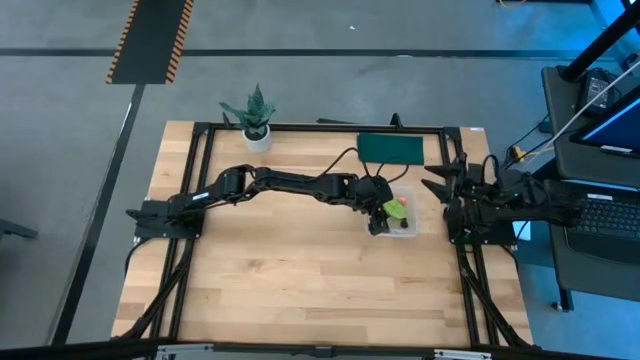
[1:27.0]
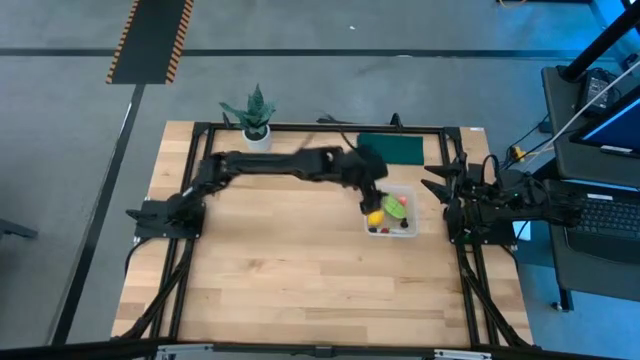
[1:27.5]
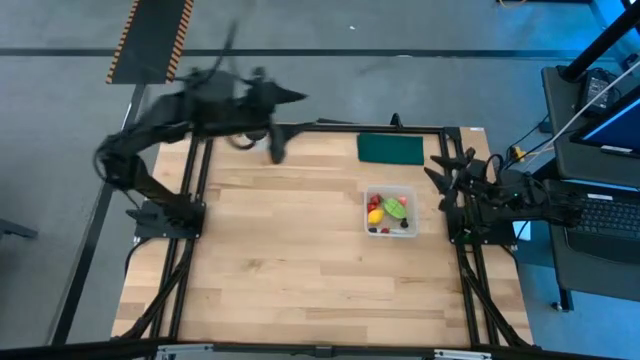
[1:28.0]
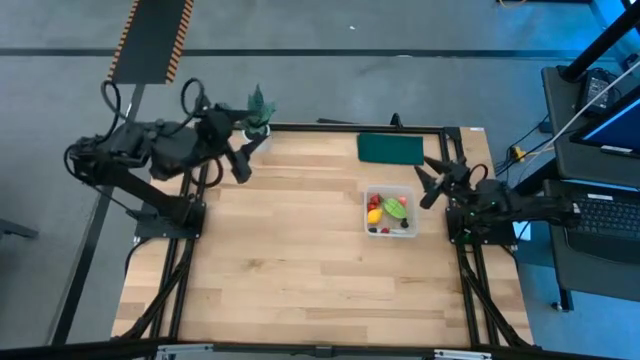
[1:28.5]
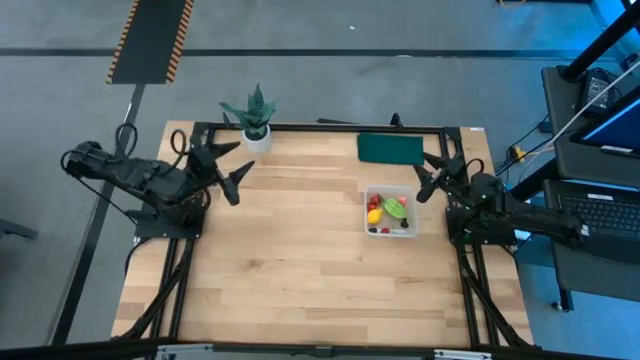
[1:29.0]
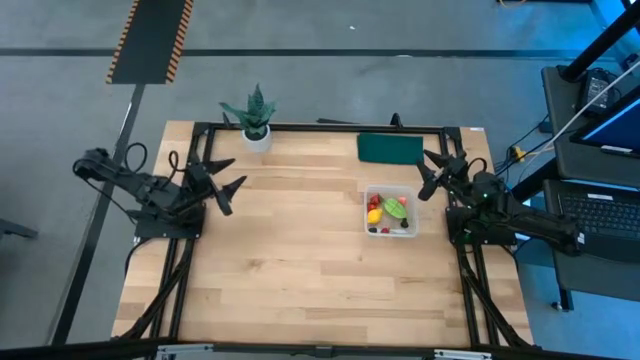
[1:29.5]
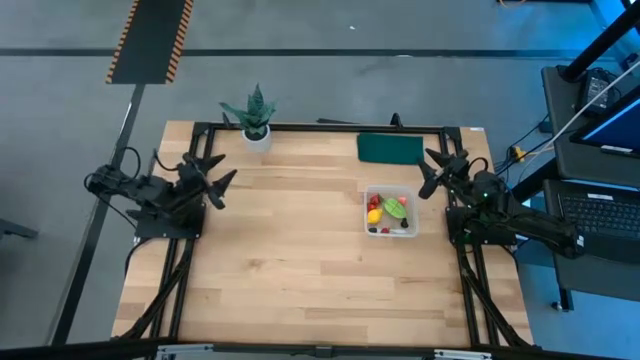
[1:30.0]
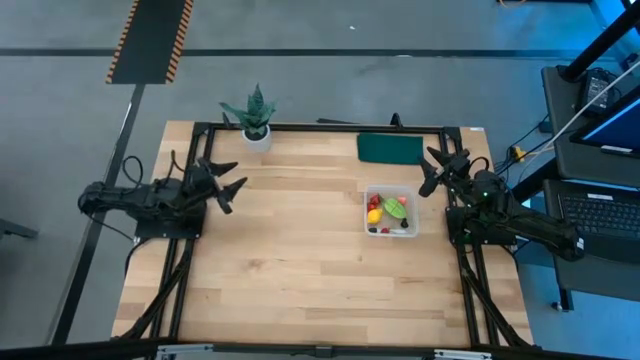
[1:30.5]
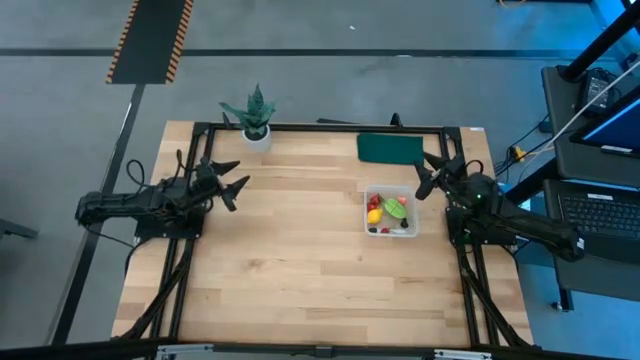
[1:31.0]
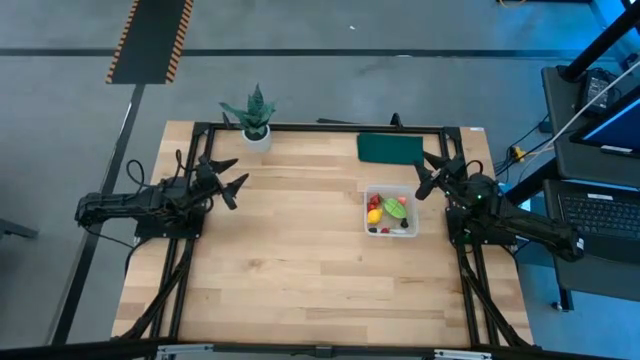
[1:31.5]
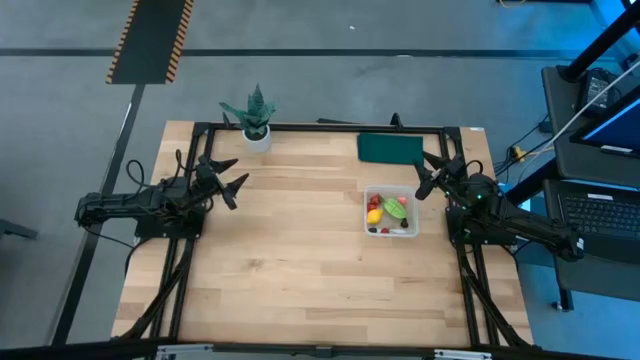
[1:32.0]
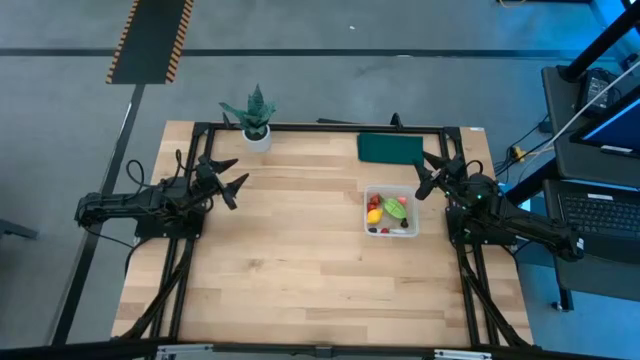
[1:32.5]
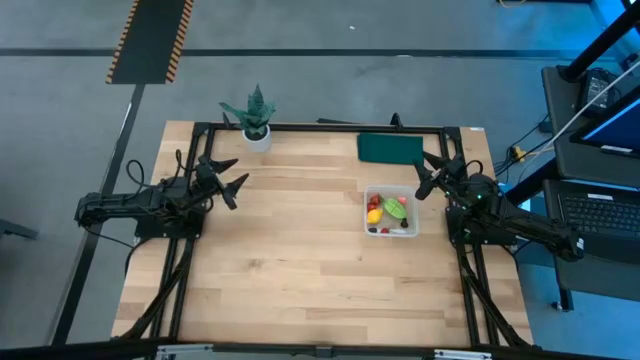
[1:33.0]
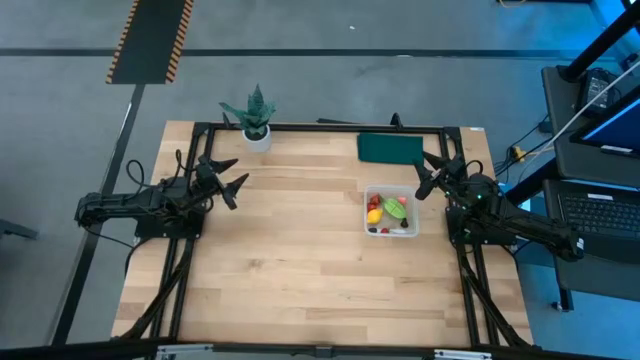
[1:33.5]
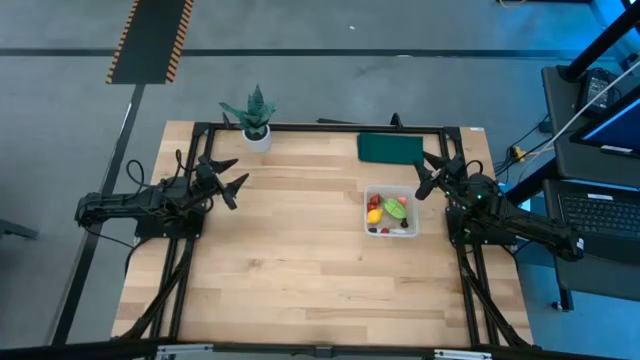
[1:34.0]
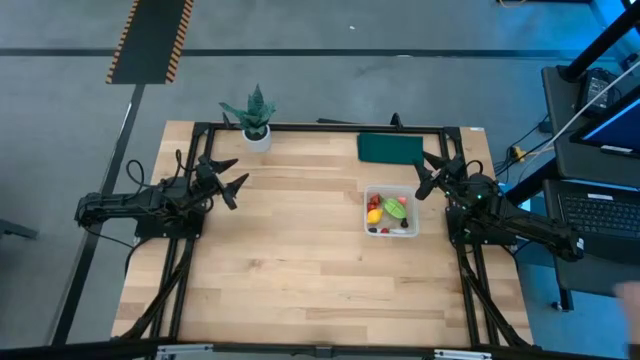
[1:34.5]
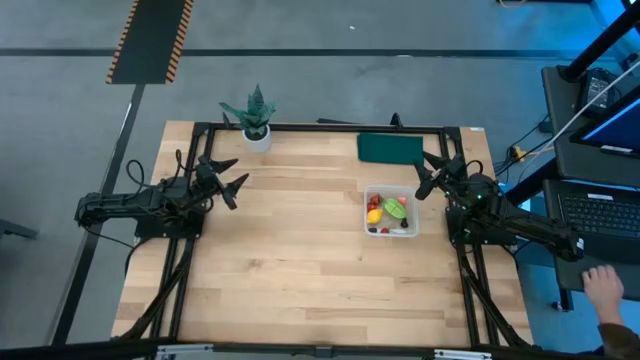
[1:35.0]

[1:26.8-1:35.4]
Task: Pick and placing Produce into tupperware
Return to Home Position

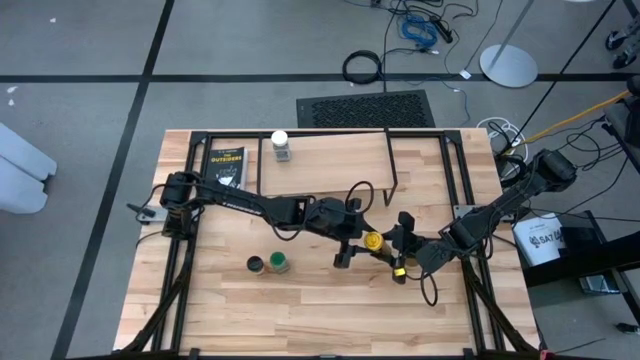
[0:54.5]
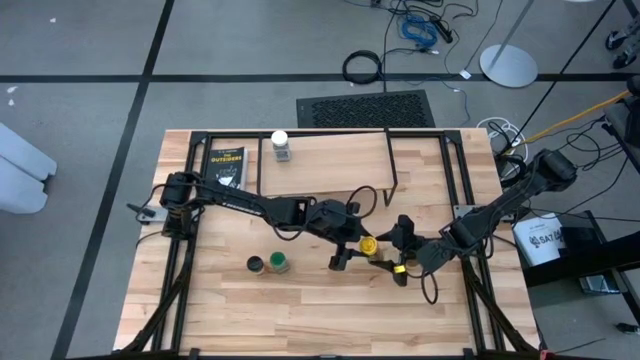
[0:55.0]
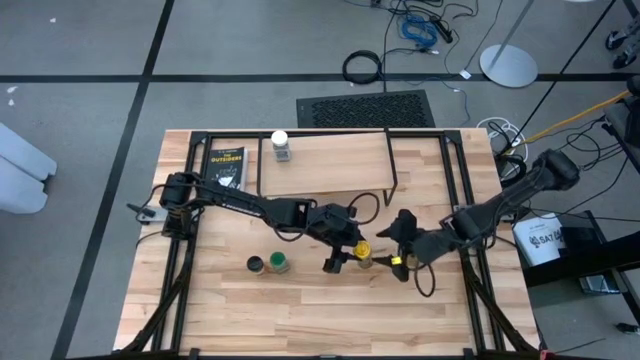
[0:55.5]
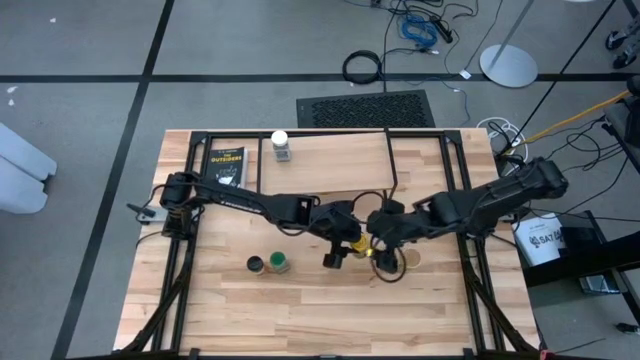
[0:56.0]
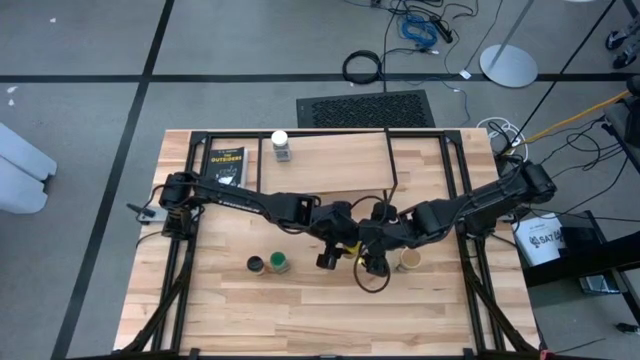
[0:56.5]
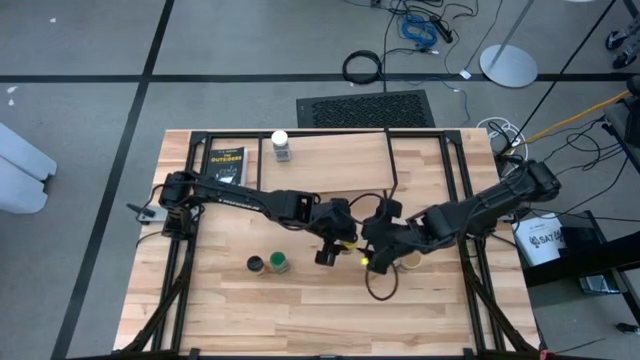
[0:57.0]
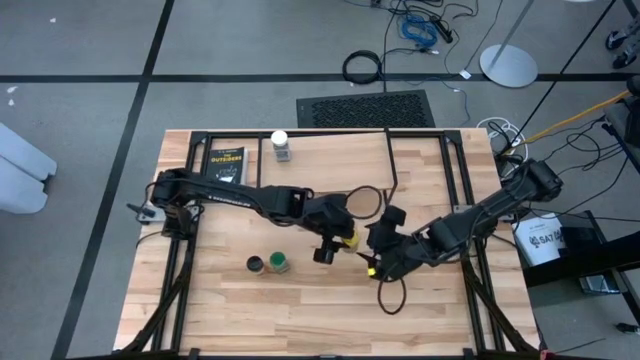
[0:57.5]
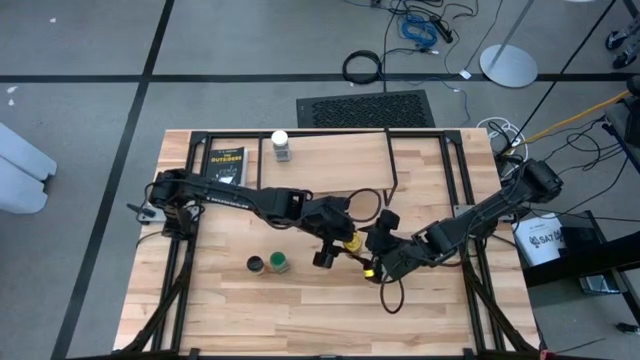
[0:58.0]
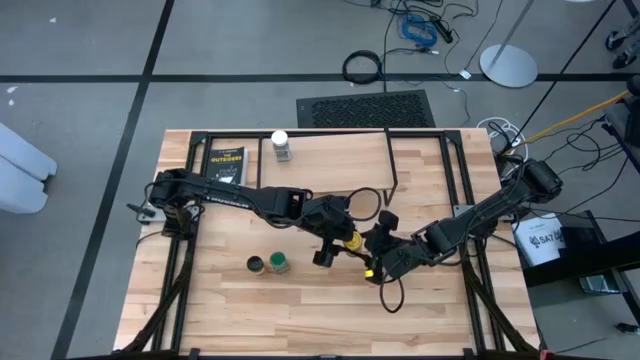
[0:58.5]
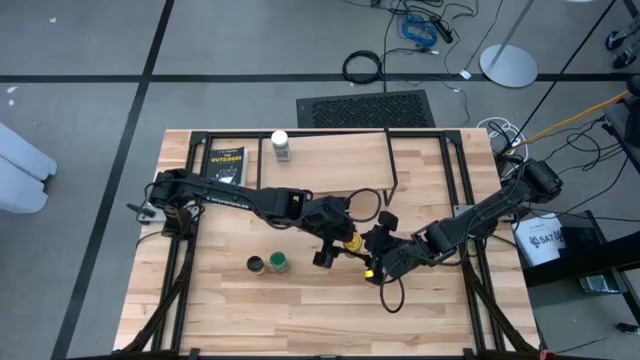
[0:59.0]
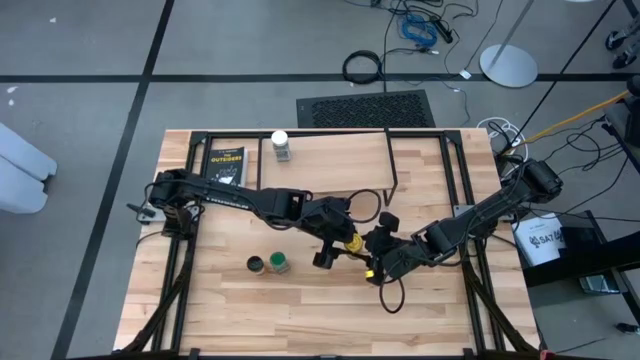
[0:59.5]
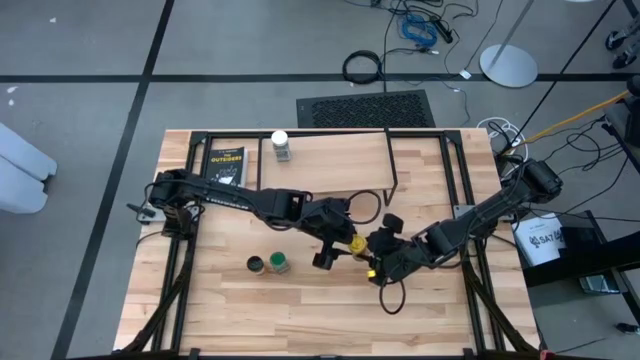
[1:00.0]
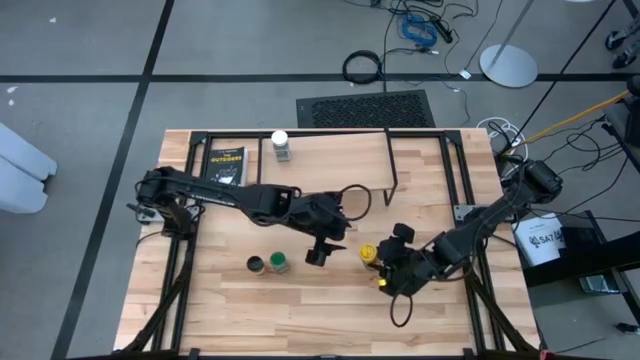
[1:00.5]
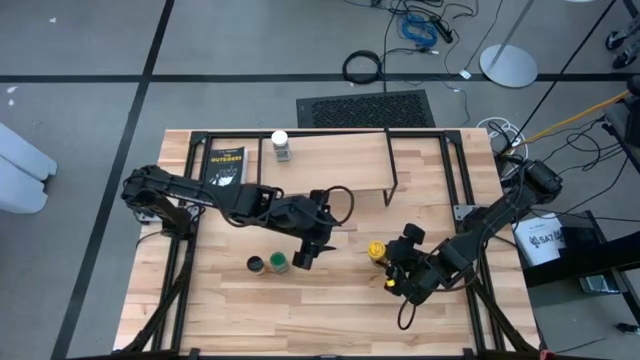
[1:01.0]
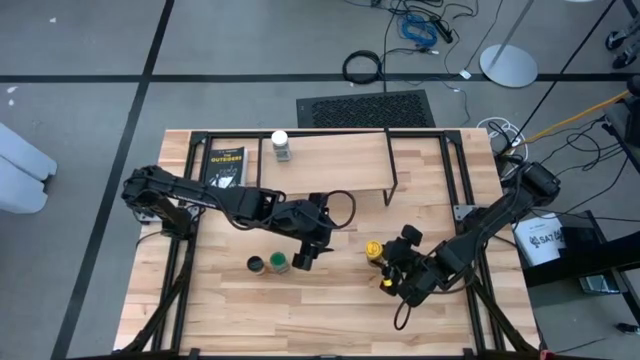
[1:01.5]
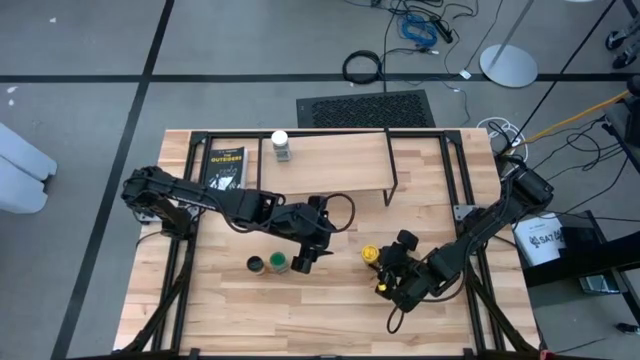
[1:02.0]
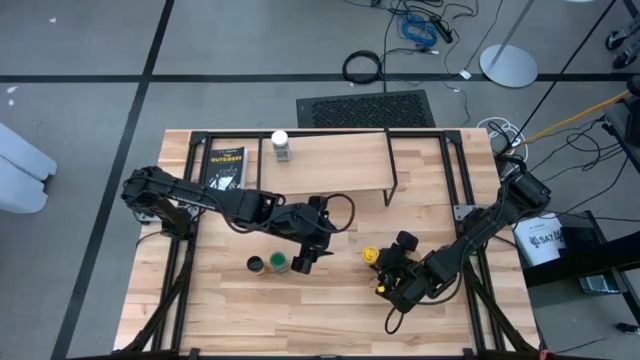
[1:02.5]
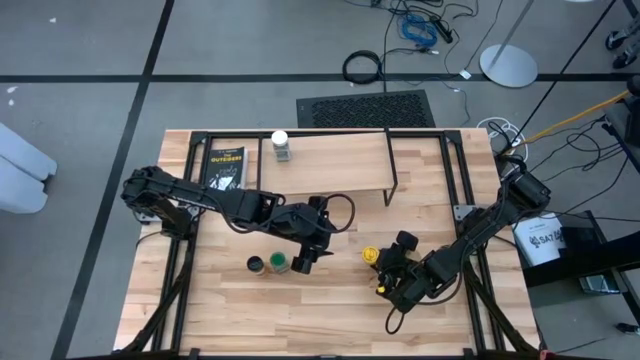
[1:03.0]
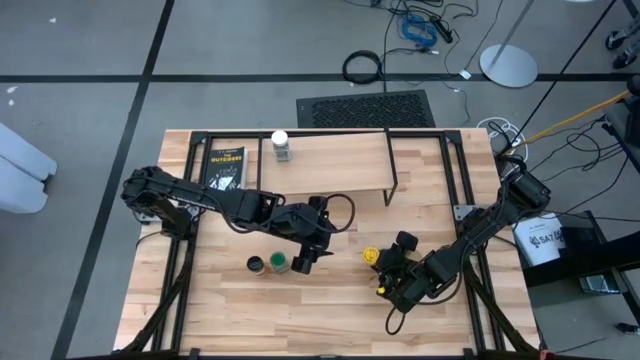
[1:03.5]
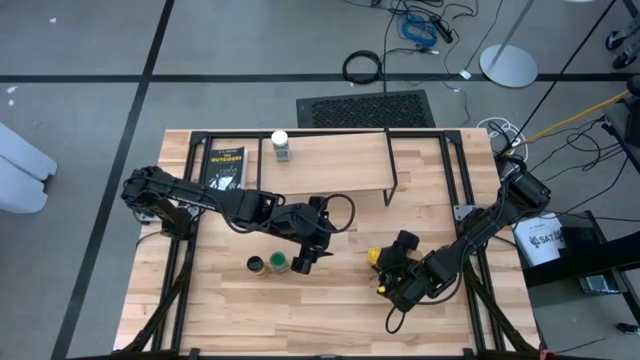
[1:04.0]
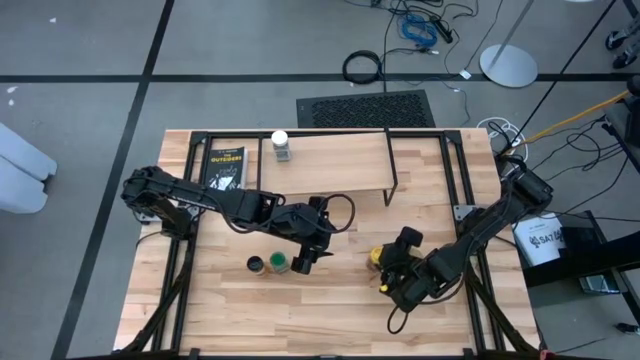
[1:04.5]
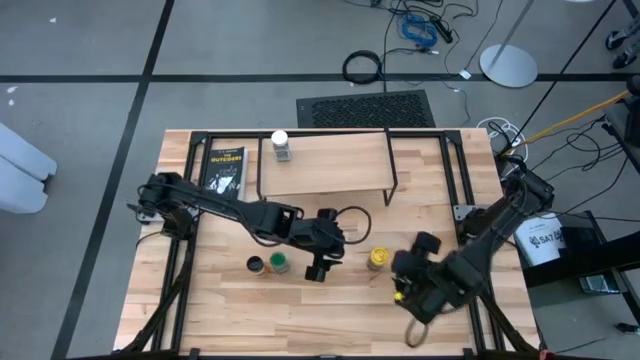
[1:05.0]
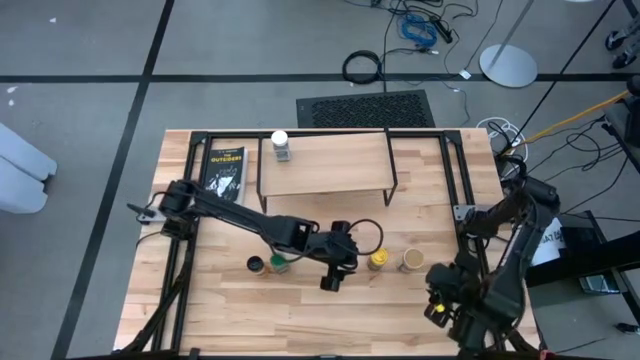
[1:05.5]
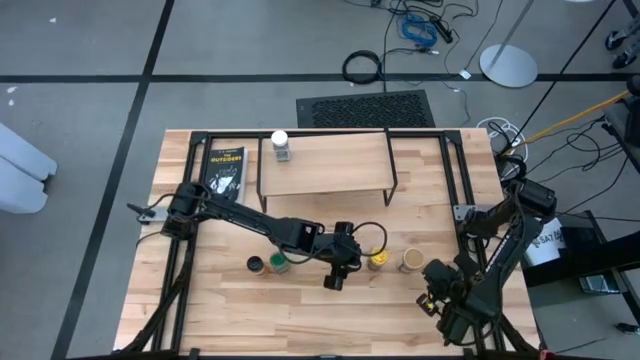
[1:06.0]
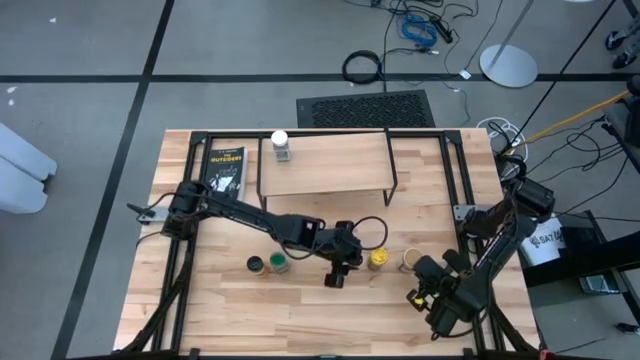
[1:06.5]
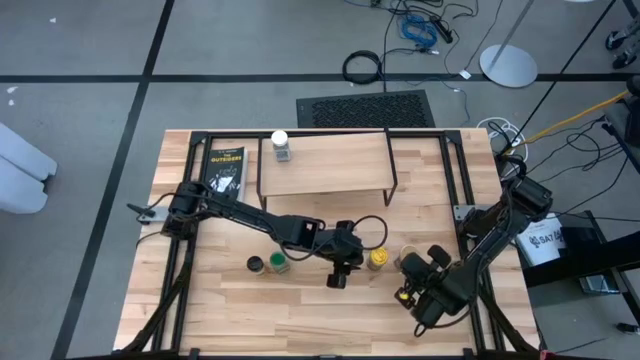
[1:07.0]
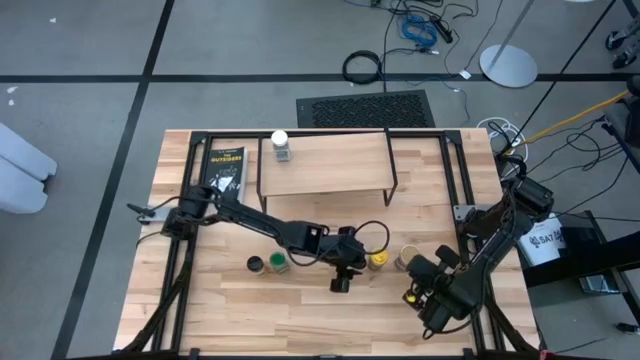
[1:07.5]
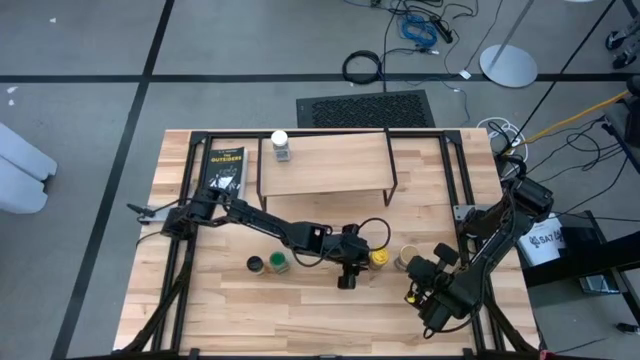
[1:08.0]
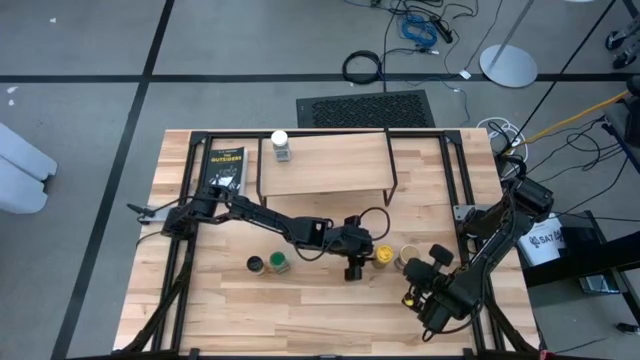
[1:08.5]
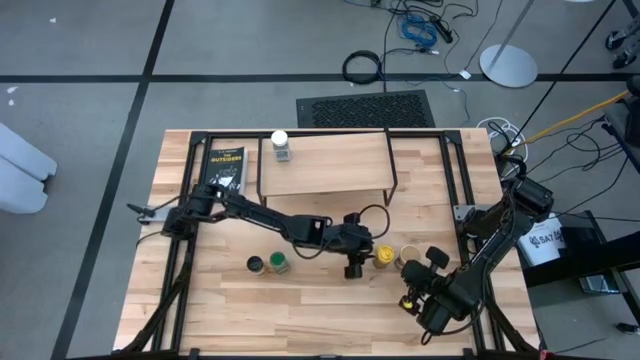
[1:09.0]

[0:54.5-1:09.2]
Task: Shelf spices
Remove the yellow seasoning bottle from the shelf
